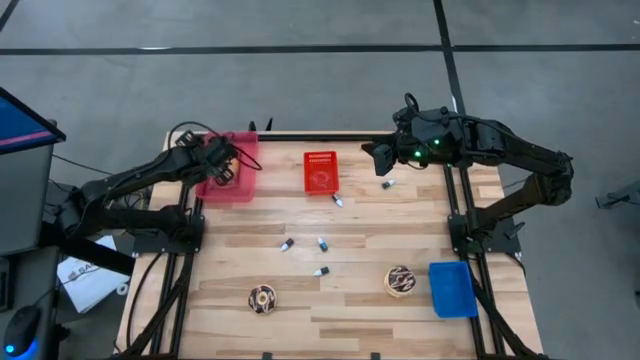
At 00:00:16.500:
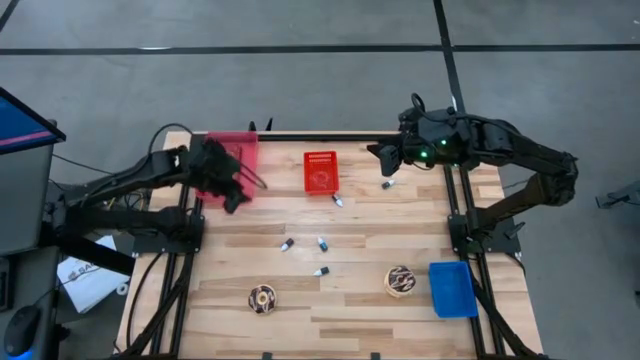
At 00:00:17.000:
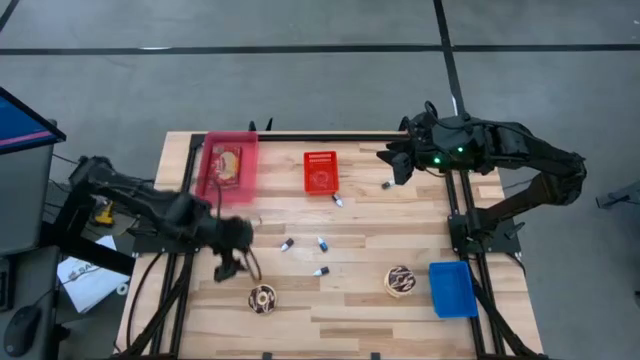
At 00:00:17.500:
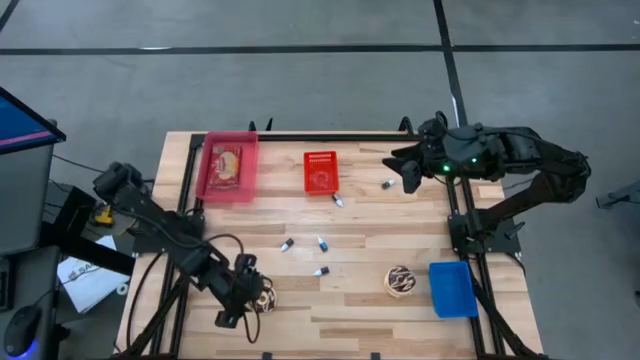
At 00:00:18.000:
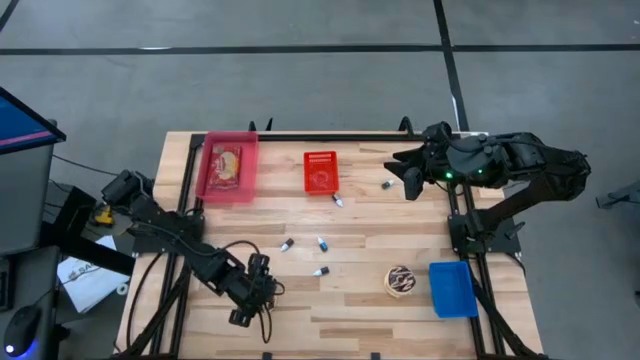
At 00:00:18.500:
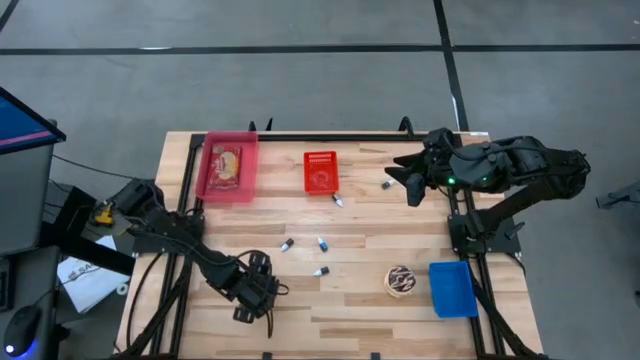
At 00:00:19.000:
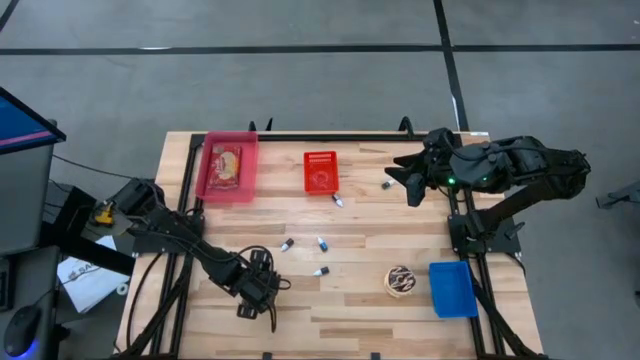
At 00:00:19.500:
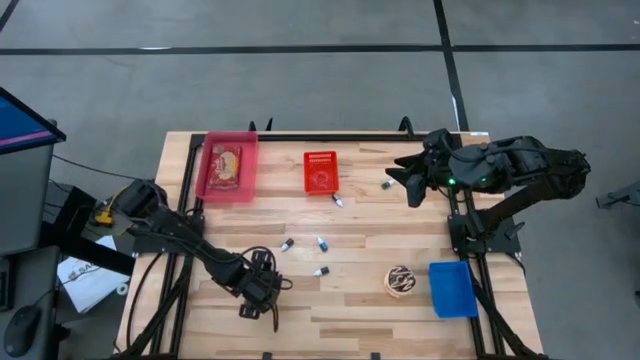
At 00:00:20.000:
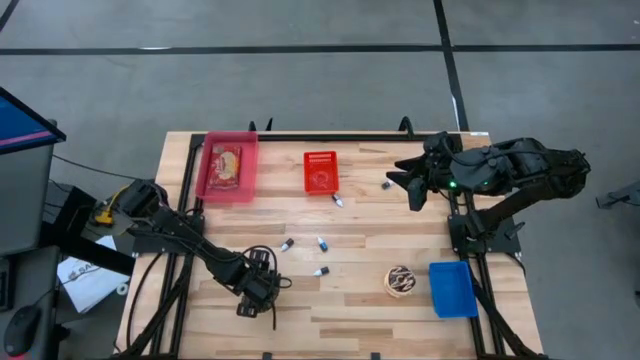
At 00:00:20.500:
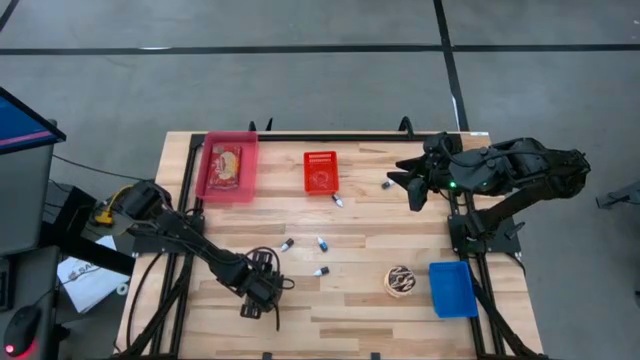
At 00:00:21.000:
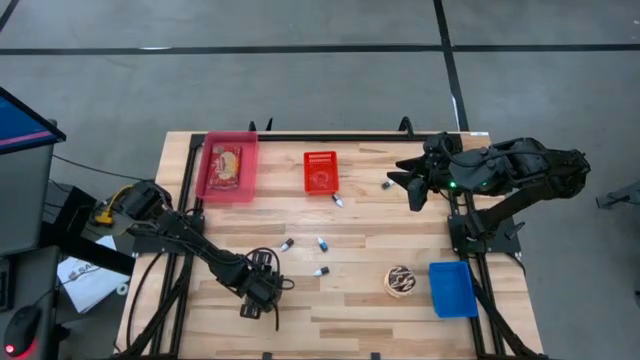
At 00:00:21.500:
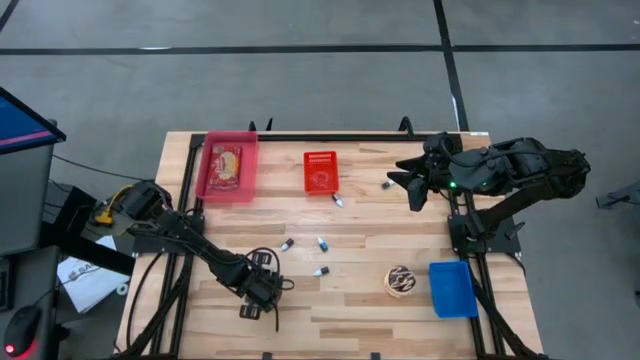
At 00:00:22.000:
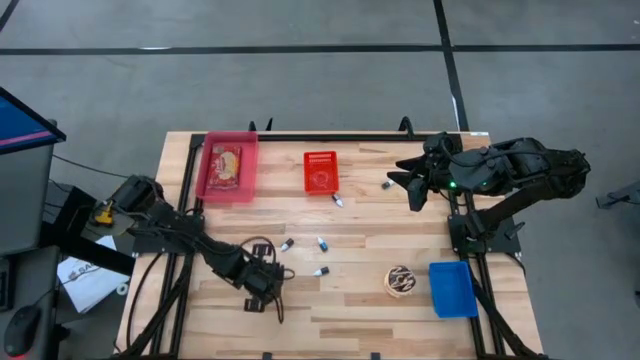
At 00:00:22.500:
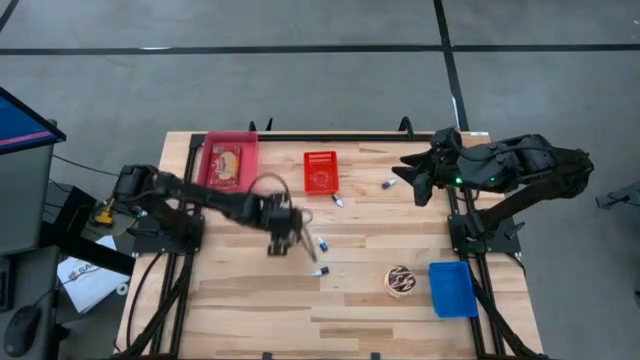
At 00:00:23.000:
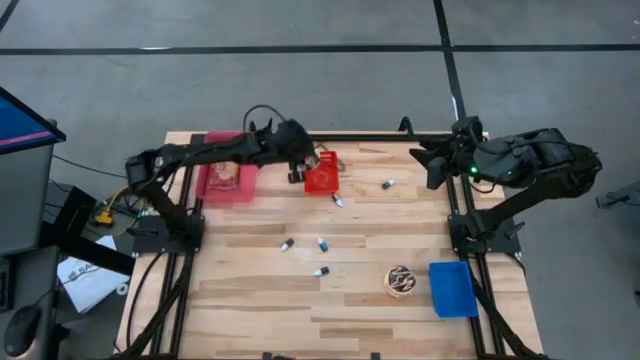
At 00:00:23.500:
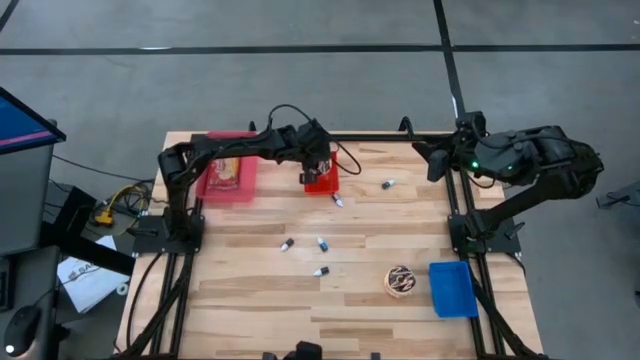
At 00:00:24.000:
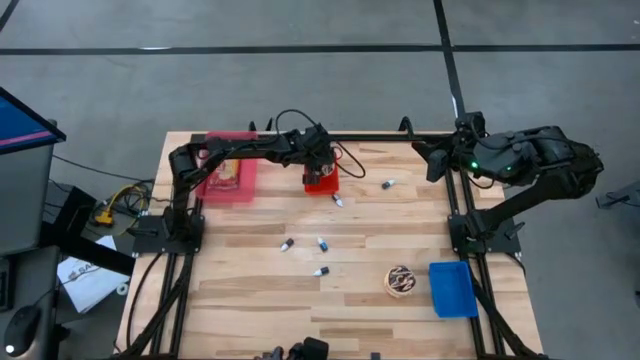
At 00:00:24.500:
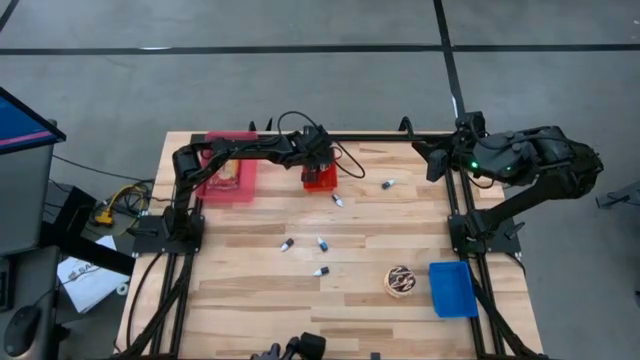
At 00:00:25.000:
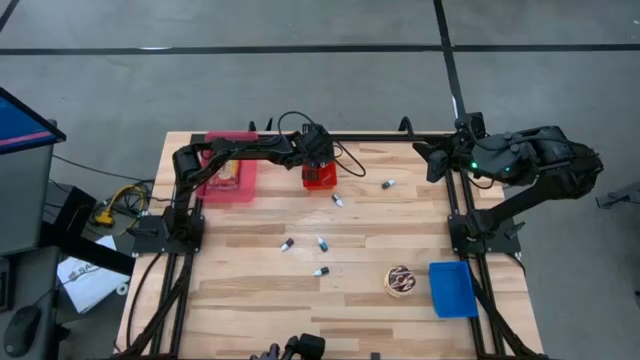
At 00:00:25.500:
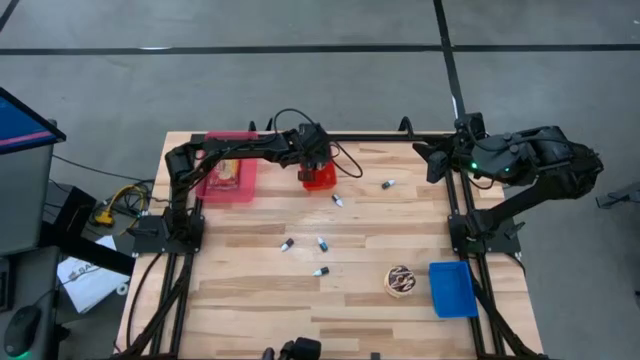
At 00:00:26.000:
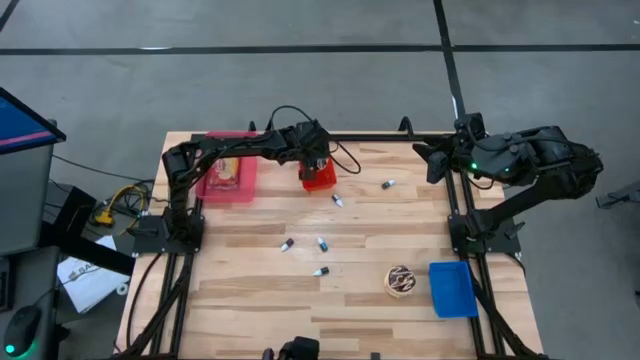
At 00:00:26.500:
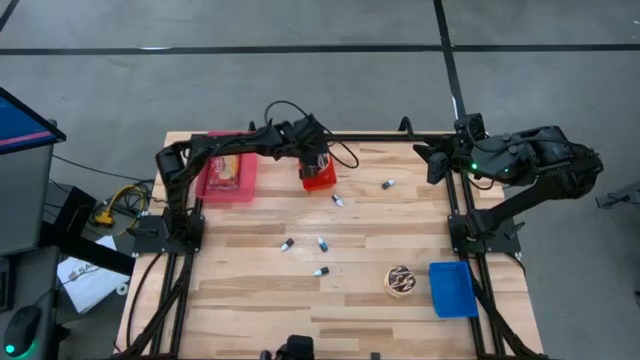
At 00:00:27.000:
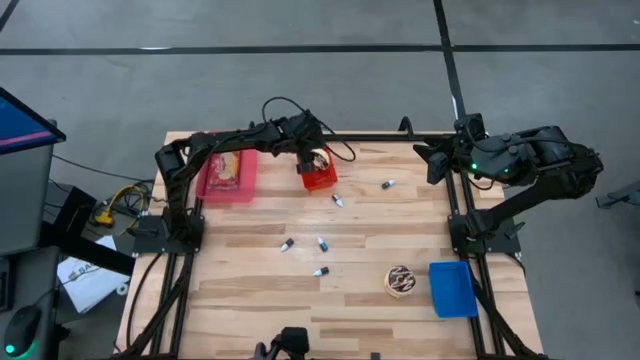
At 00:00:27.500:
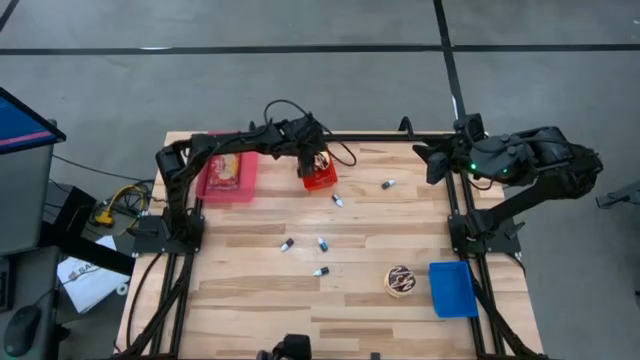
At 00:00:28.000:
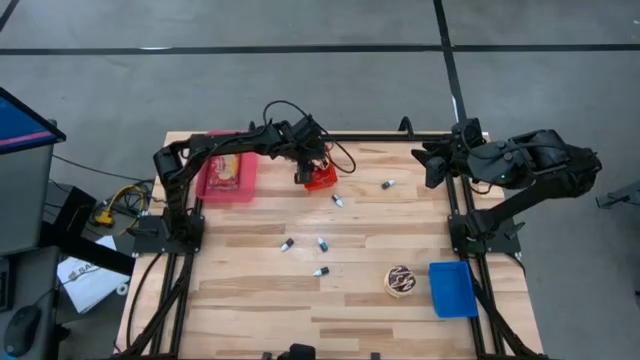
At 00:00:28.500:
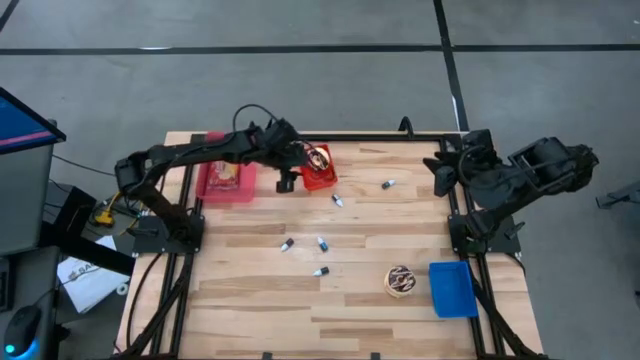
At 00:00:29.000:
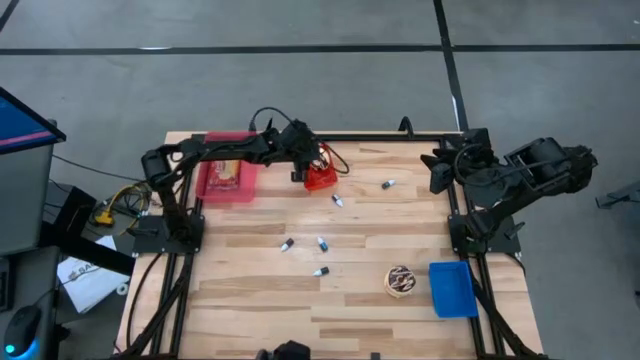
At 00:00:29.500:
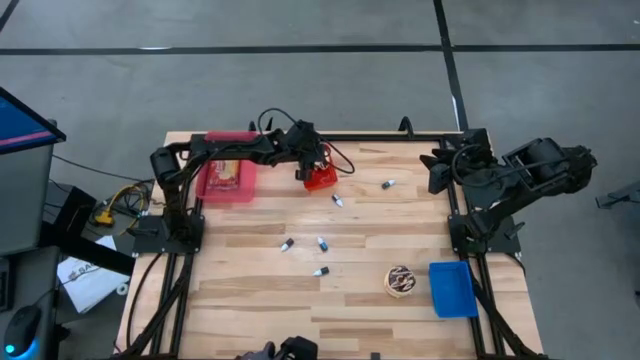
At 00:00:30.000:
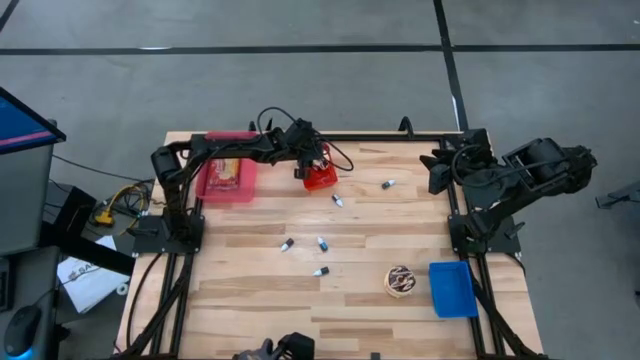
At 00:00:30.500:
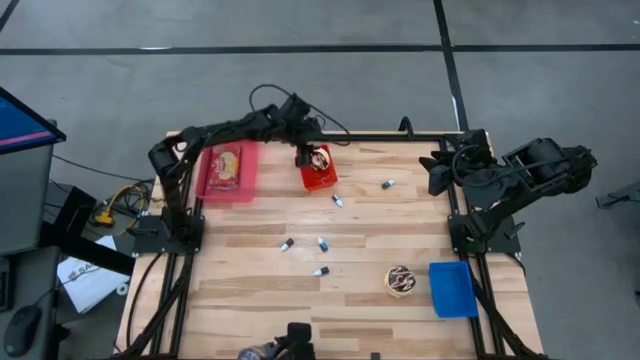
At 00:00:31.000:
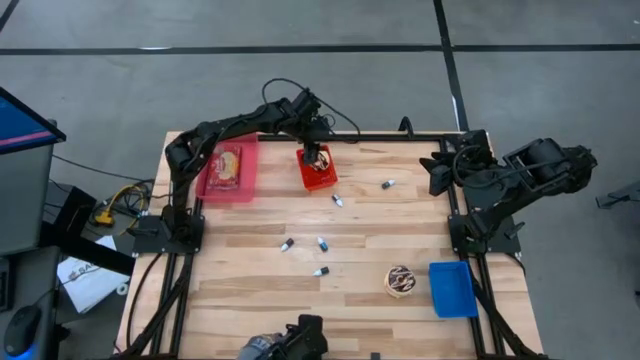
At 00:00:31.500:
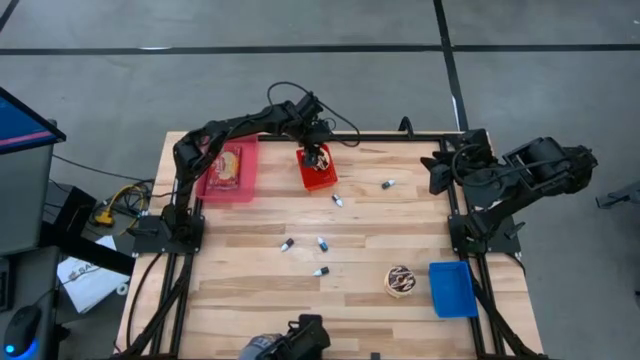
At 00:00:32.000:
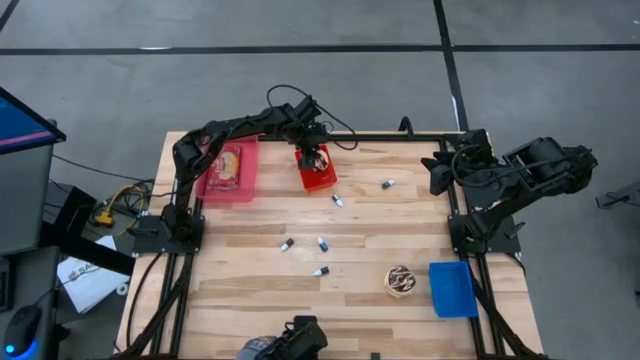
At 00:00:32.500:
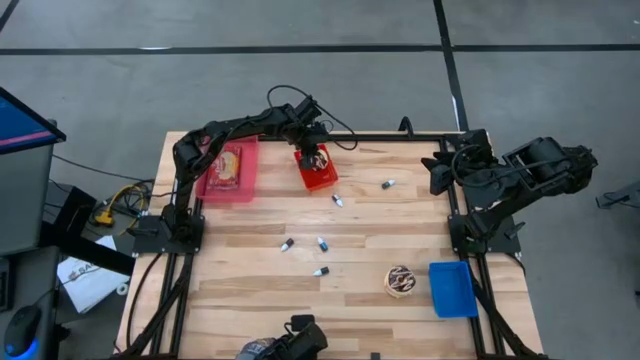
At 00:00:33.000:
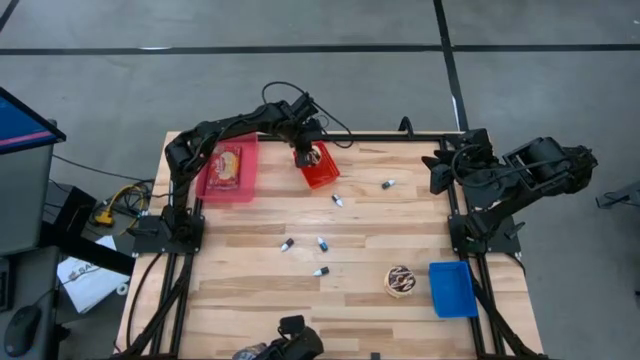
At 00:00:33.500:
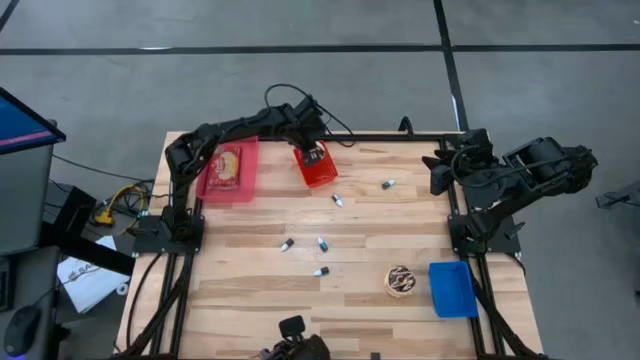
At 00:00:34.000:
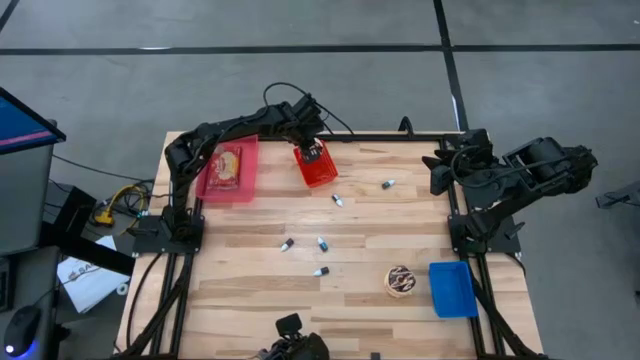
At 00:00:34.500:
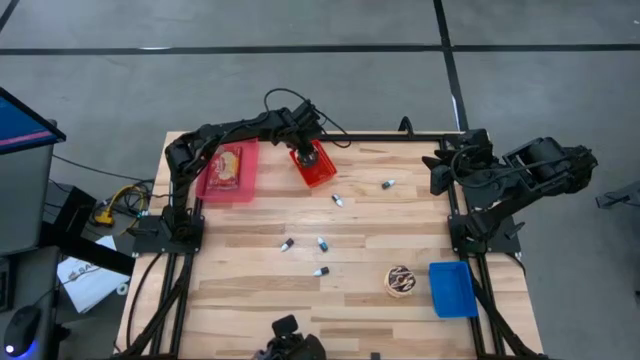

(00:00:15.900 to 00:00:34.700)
Put the left black donut into the red bin
